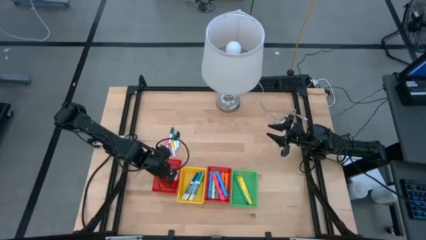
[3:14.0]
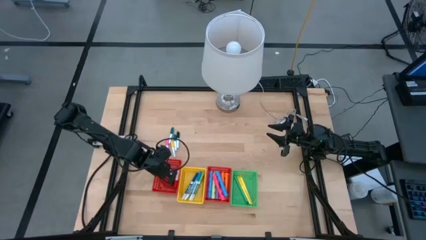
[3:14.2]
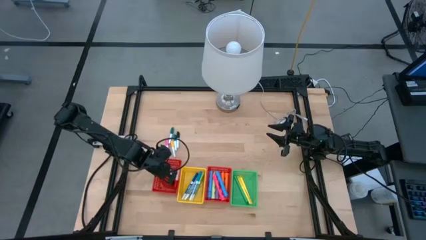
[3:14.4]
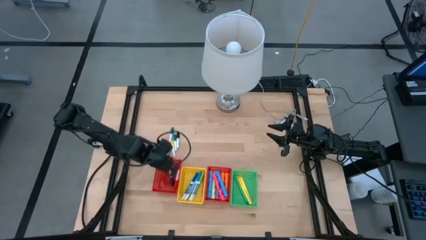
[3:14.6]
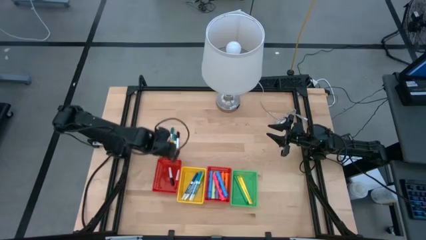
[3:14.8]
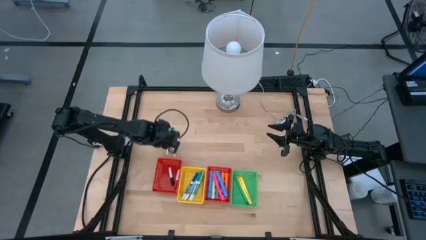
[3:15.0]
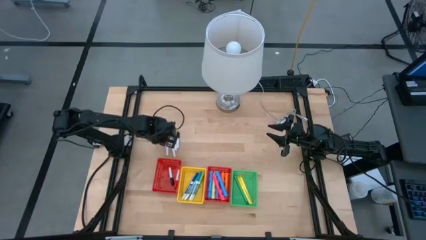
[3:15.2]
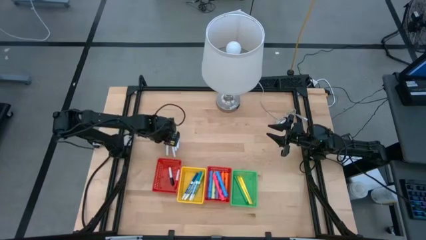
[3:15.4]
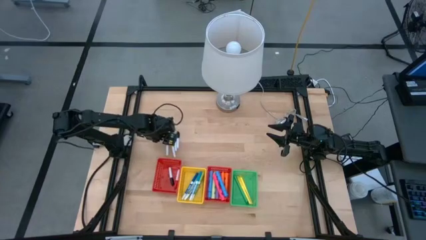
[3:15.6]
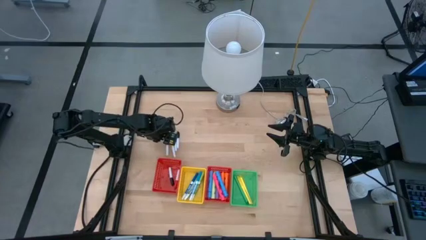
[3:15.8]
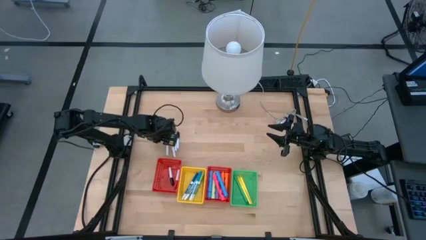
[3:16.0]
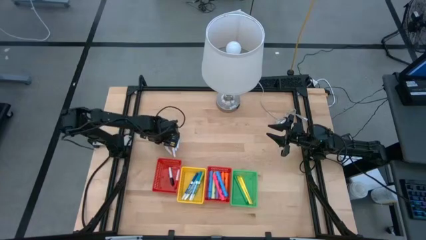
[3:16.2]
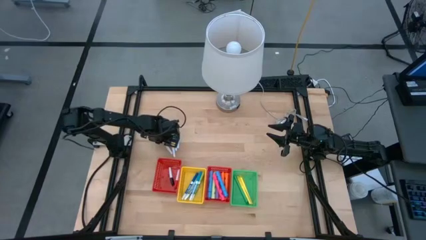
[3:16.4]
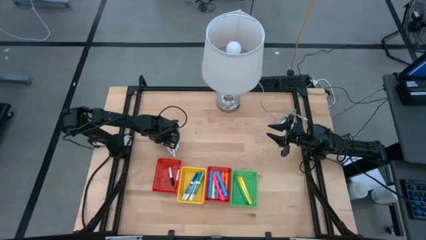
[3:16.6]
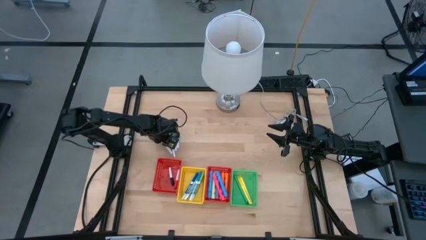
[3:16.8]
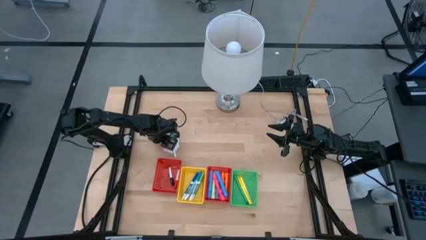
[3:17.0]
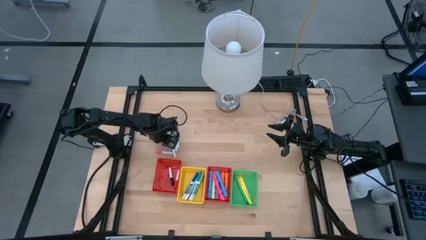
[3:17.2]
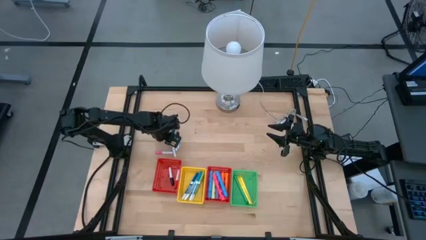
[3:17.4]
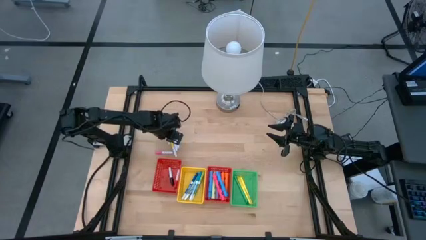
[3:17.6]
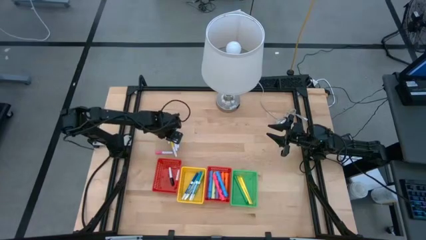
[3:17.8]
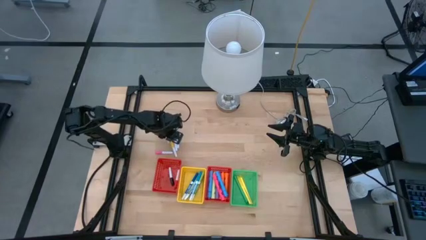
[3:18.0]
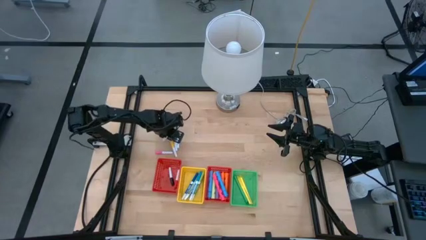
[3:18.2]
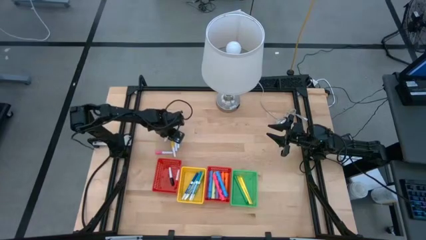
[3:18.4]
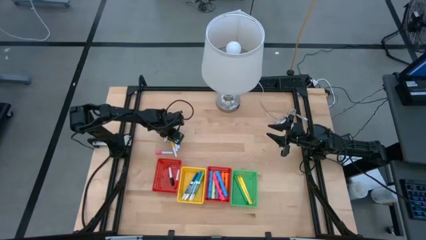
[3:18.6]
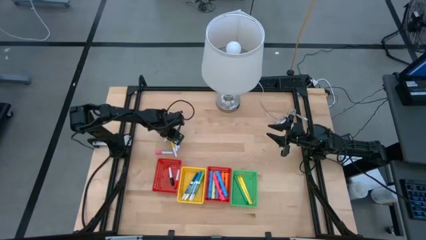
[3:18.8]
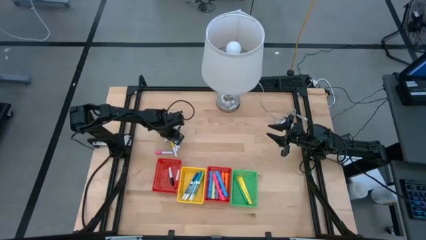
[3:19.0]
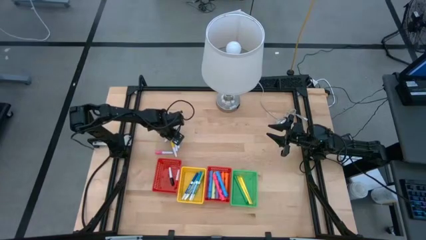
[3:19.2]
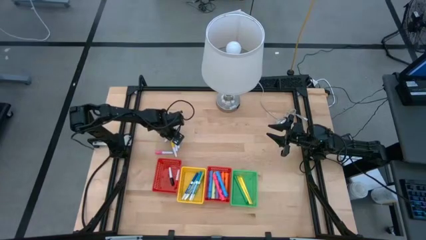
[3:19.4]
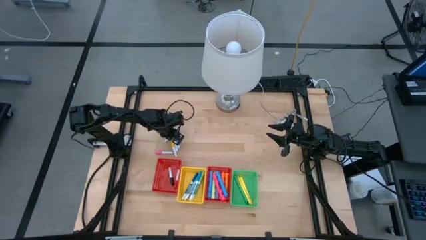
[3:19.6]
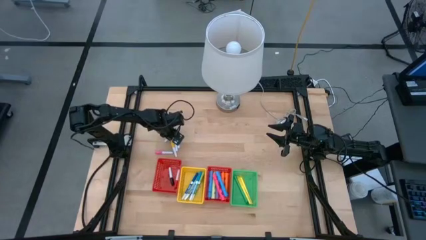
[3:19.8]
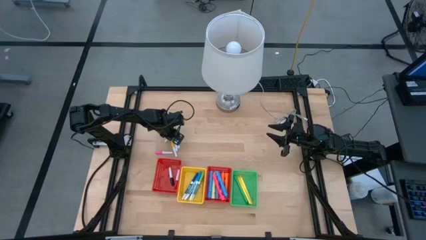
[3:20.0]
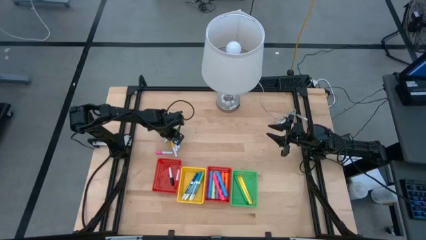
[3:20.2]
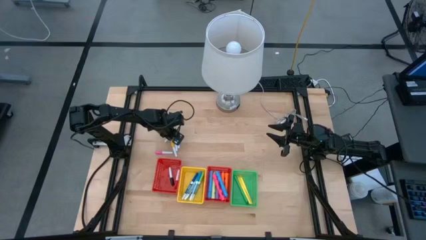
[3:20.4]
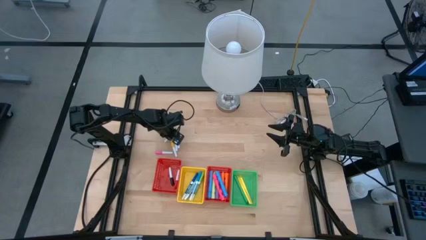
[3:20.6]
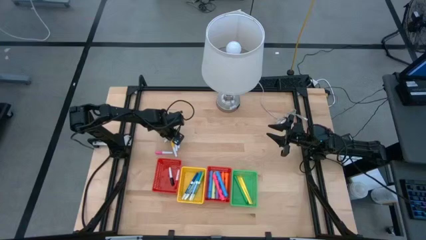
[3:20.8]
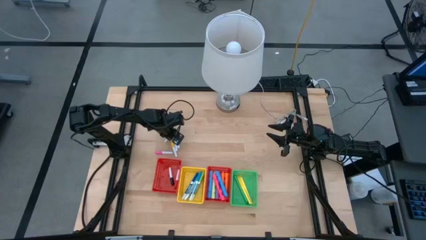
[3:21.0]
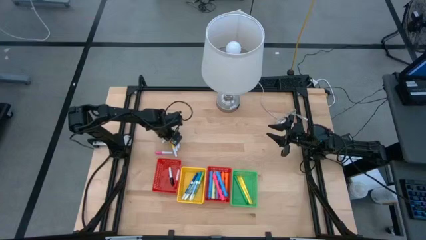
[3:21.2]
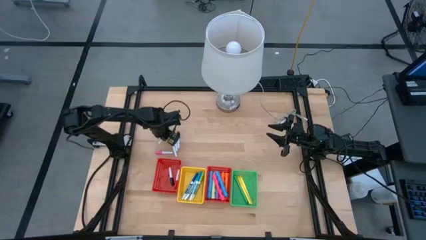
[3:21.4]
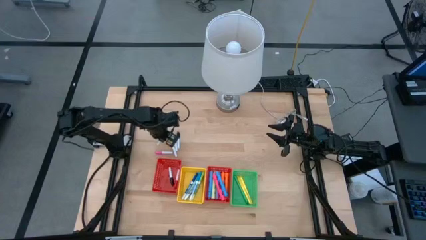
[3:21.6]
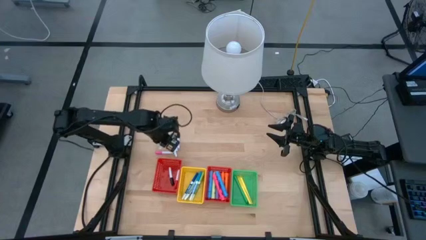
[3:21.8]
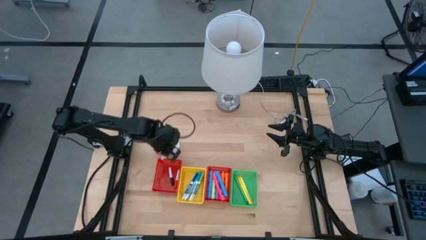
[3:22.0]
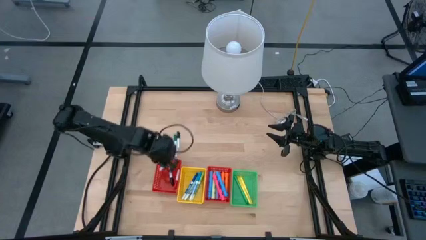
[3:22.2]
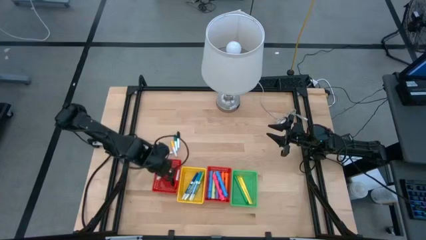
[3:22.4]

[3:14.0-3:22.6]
Task: Pick & Place Markers
Put the small green highlighter into the left red bin

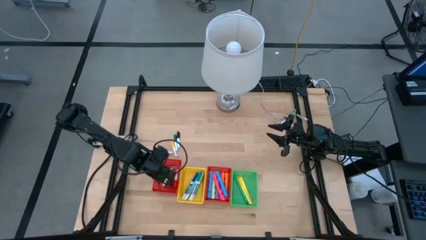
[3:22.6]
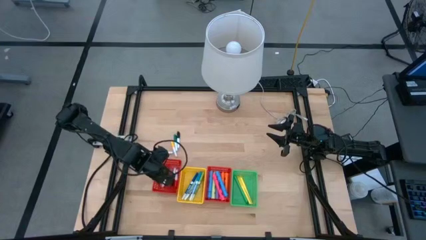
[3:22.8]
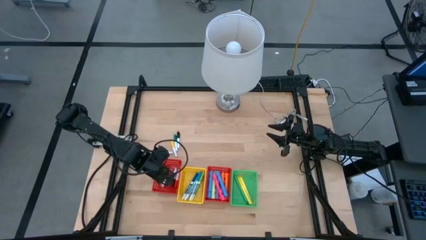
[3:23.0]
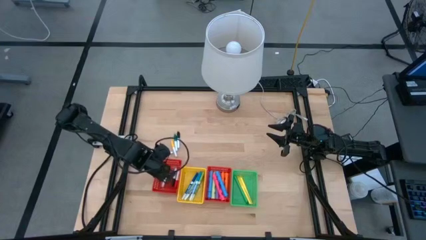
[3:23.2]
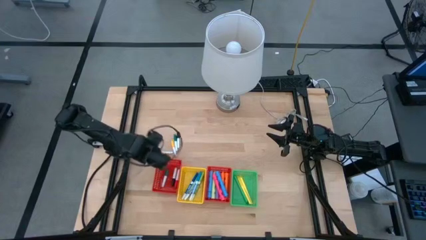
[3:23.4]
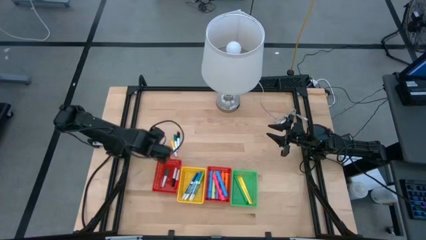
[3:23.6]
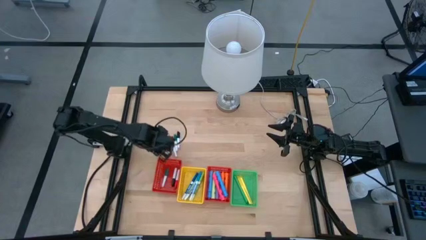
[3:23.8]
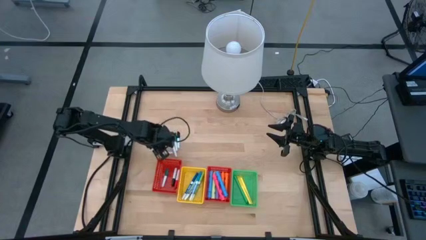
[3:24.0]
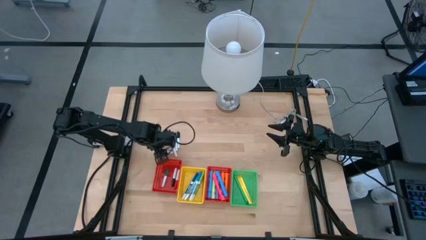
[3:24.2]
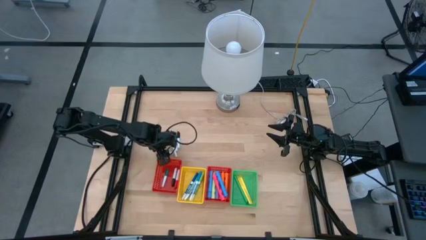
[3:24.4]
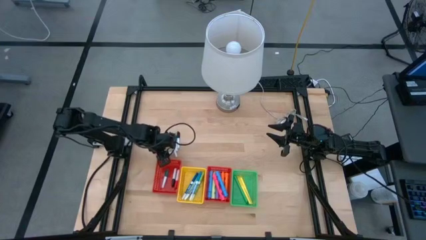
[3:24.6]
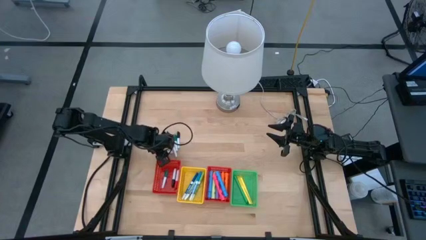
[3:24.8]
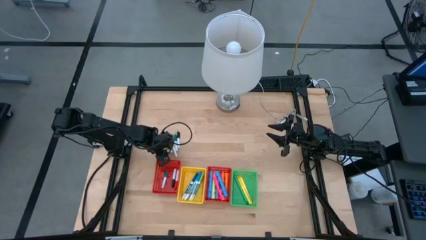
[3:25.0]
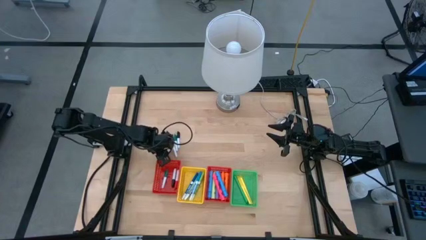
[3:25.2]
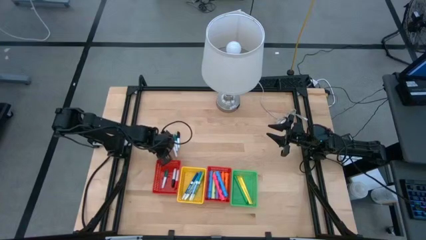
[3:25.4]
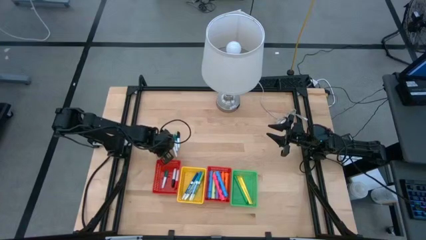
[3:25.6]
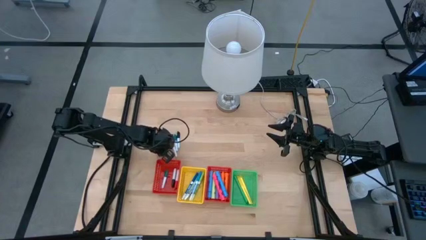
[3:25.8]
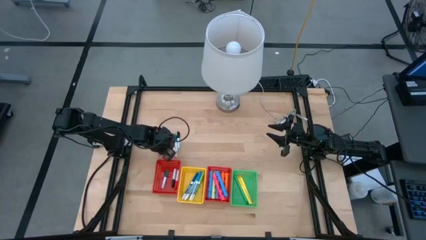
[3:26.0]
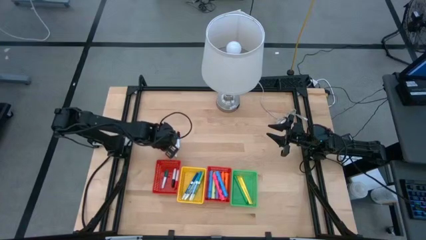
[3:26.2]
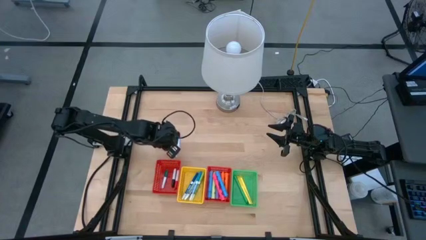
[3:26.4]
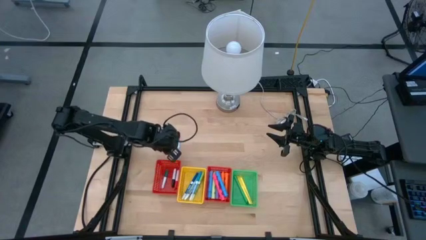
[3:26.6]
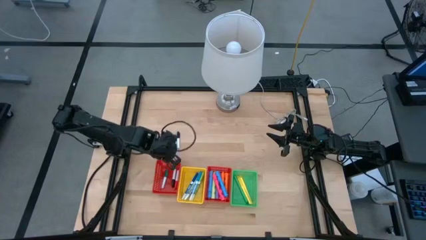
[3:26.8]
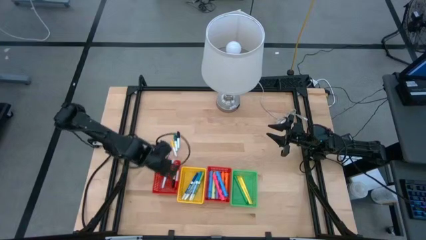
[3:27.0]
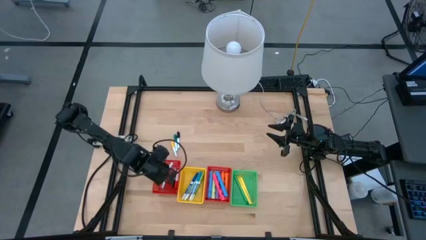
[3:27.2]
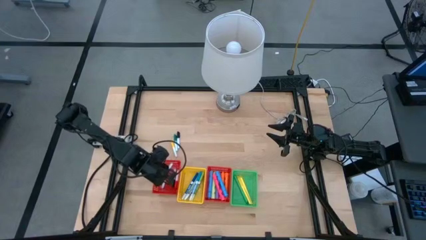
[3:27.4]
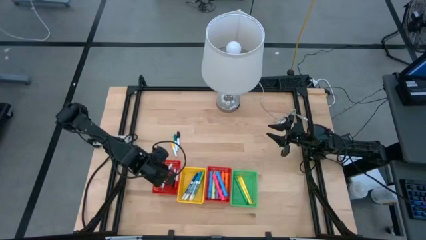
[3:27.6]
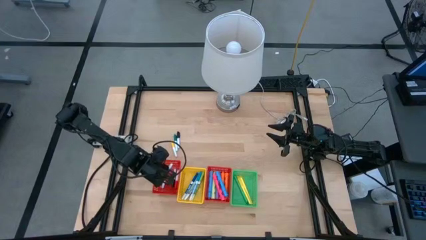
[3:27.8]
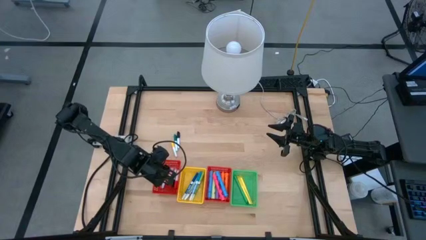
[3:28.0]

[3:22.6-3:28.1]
Put the small pink highlighter into the left red bin
